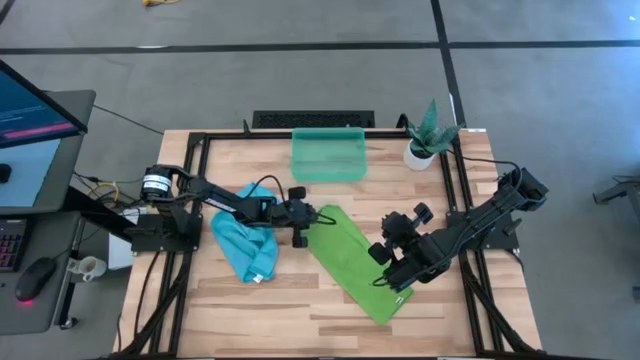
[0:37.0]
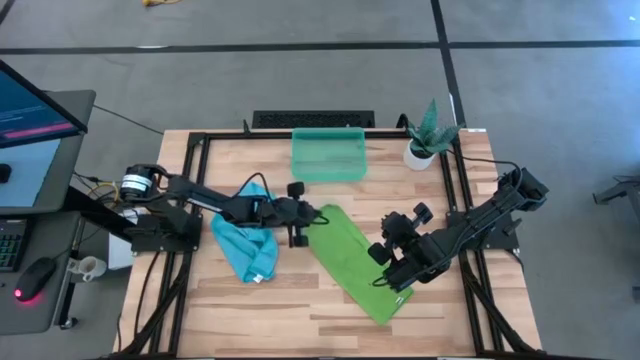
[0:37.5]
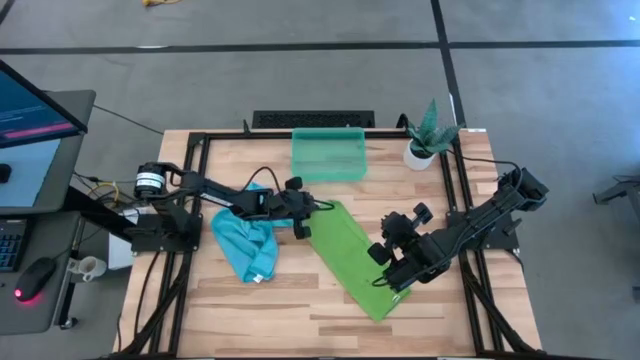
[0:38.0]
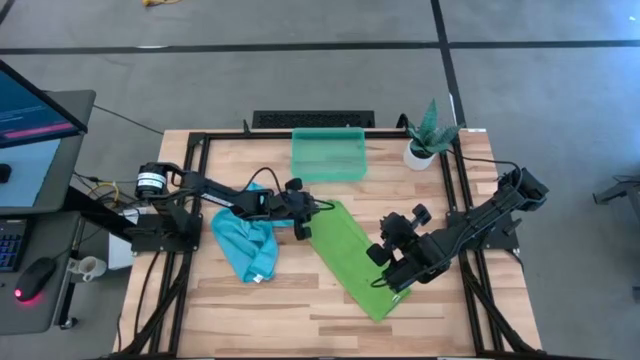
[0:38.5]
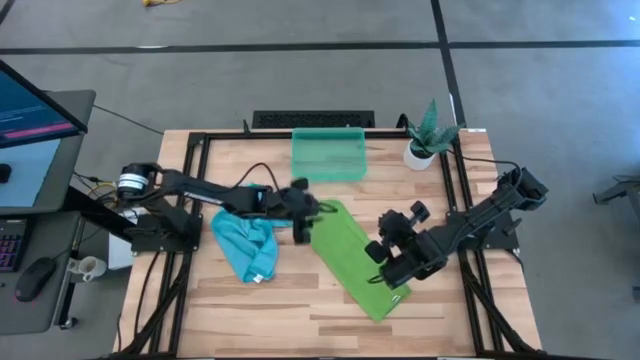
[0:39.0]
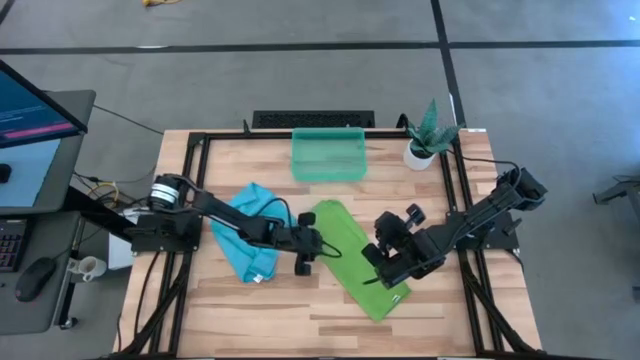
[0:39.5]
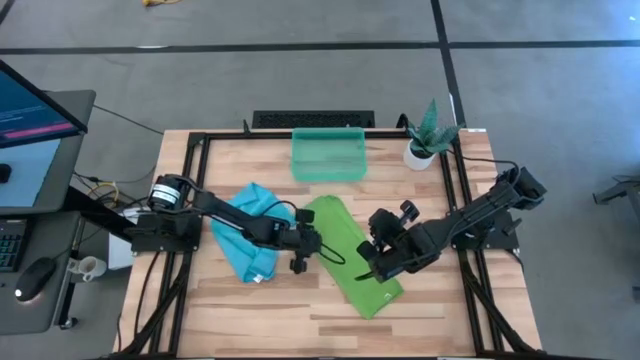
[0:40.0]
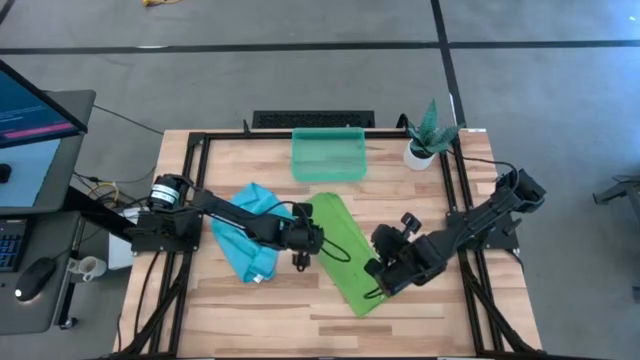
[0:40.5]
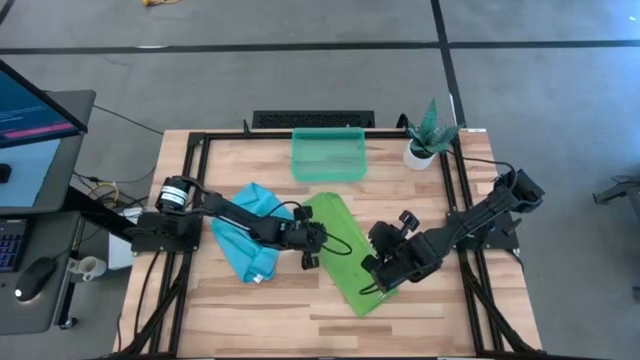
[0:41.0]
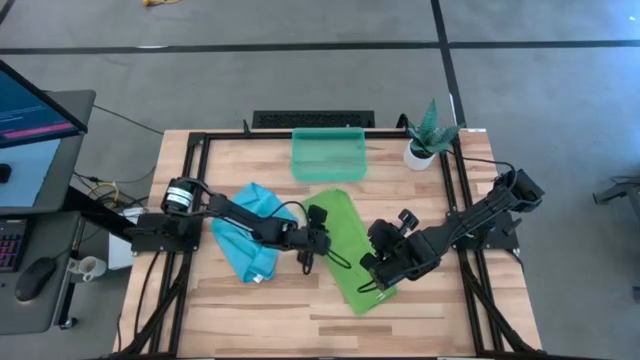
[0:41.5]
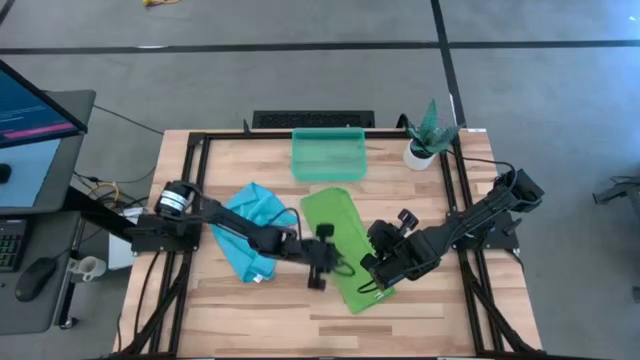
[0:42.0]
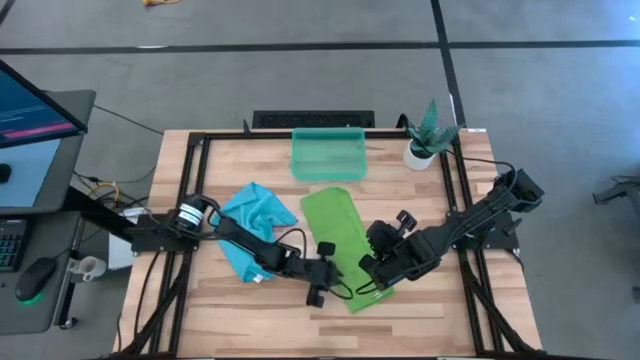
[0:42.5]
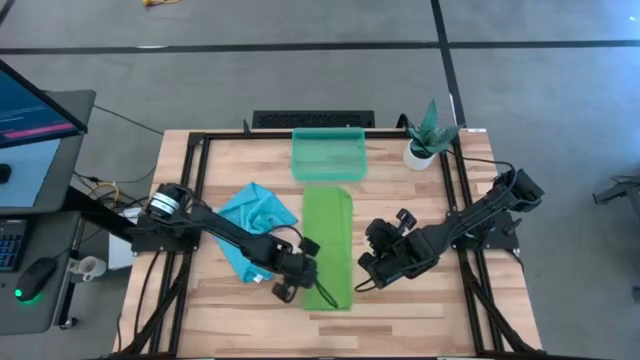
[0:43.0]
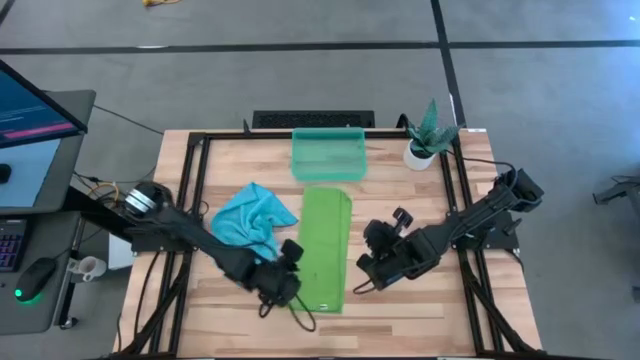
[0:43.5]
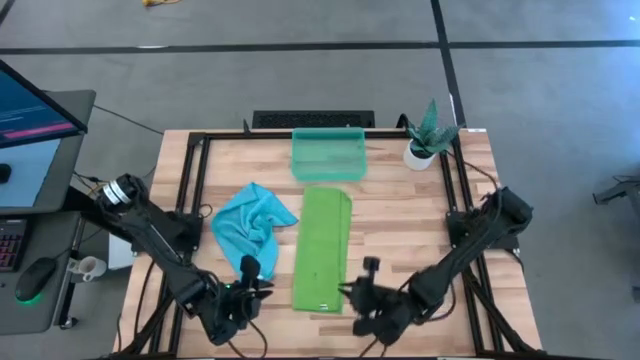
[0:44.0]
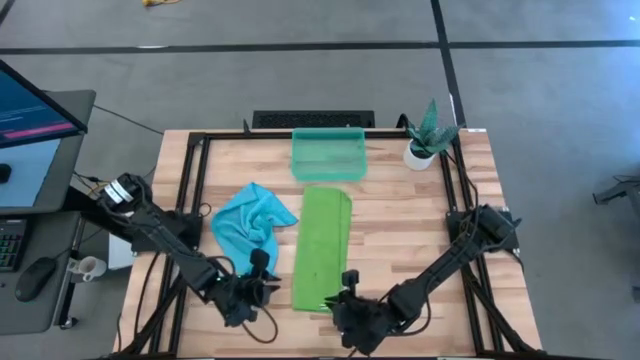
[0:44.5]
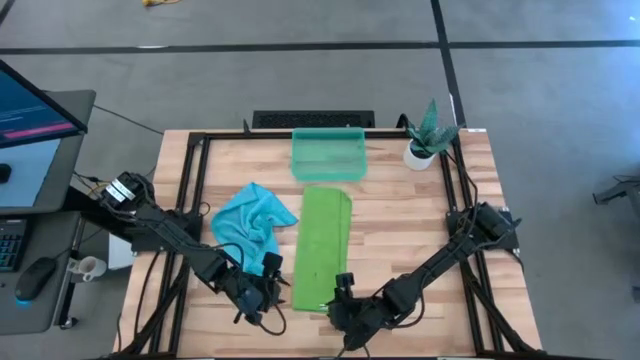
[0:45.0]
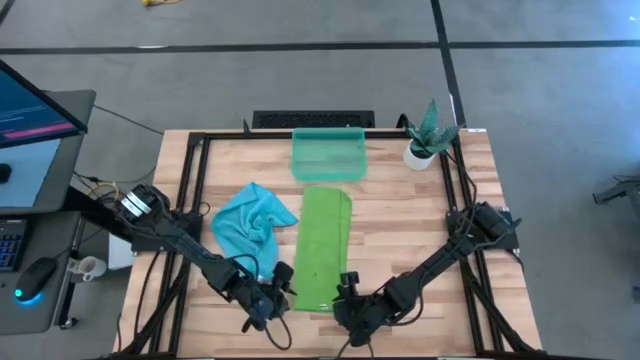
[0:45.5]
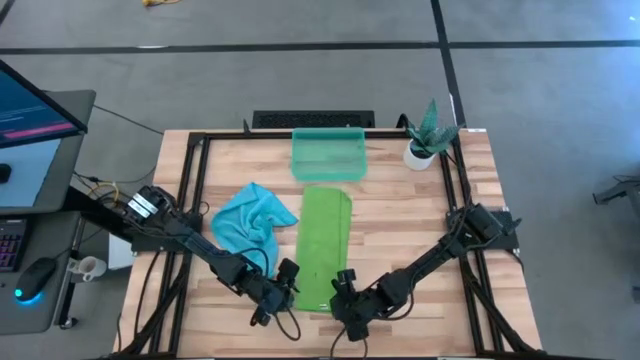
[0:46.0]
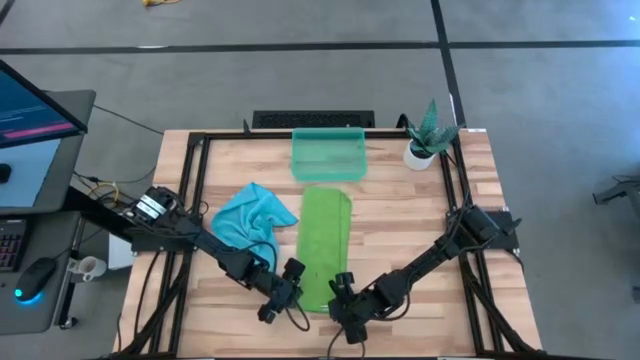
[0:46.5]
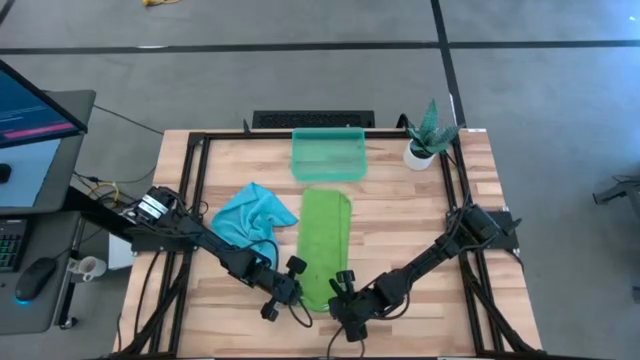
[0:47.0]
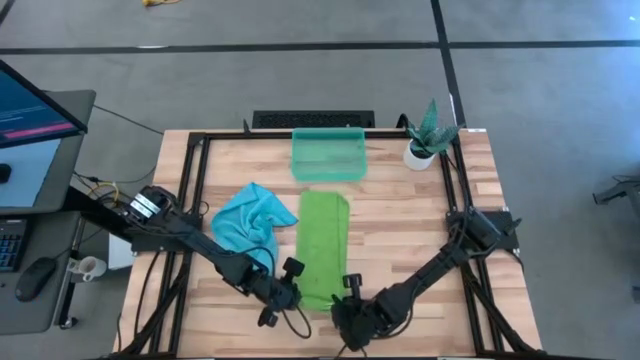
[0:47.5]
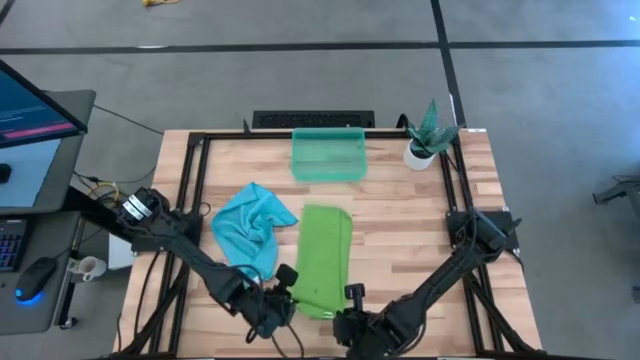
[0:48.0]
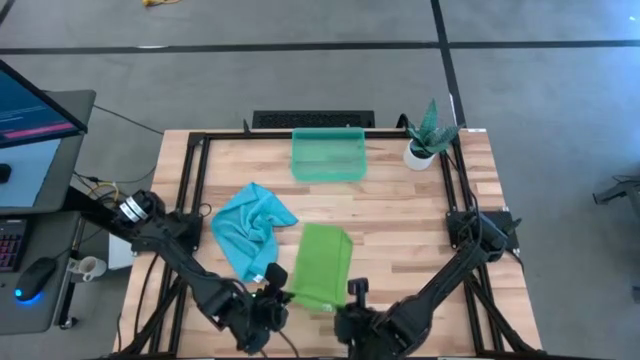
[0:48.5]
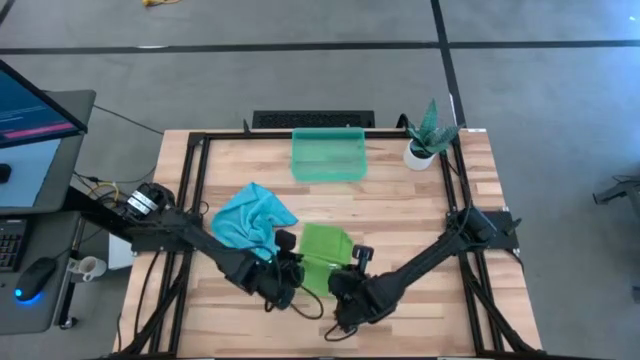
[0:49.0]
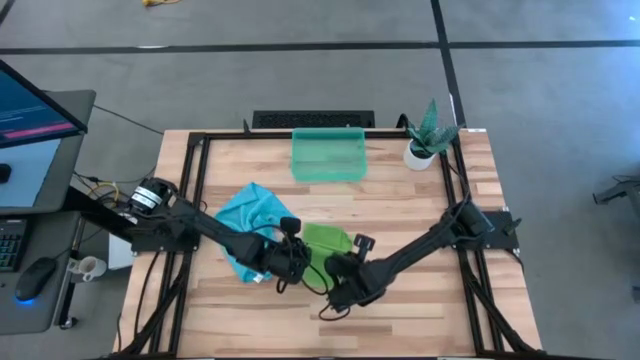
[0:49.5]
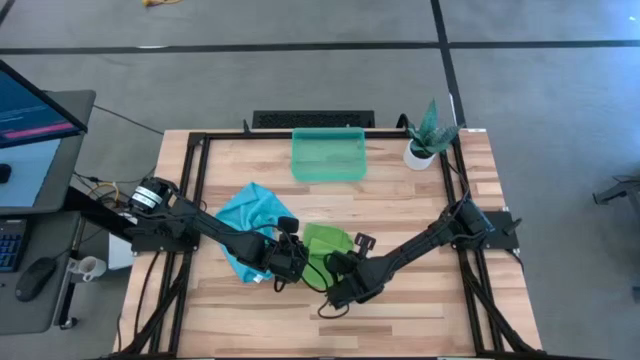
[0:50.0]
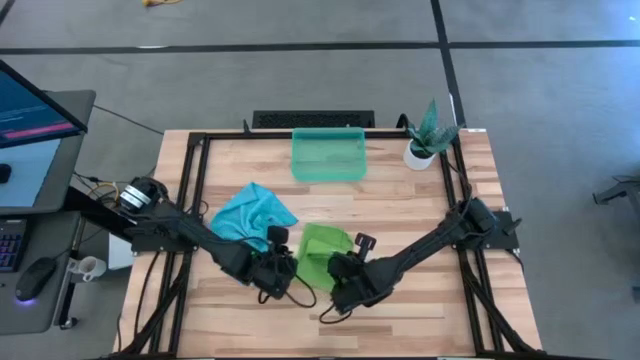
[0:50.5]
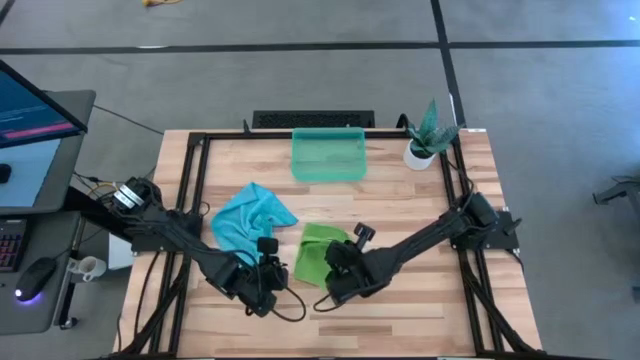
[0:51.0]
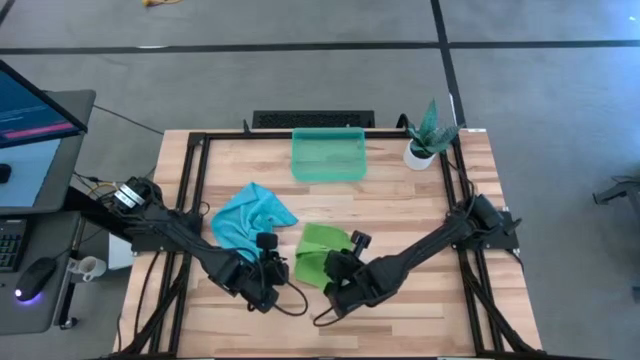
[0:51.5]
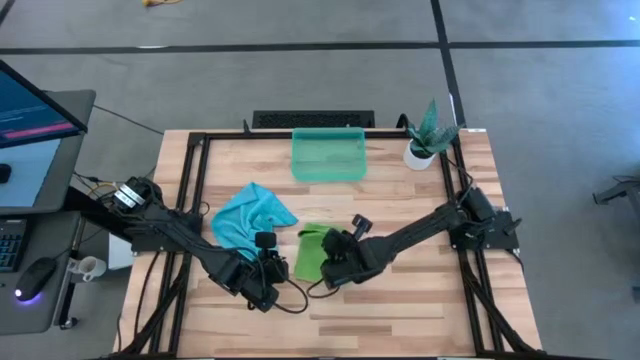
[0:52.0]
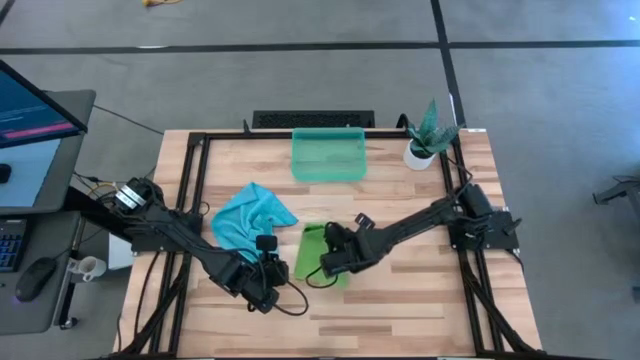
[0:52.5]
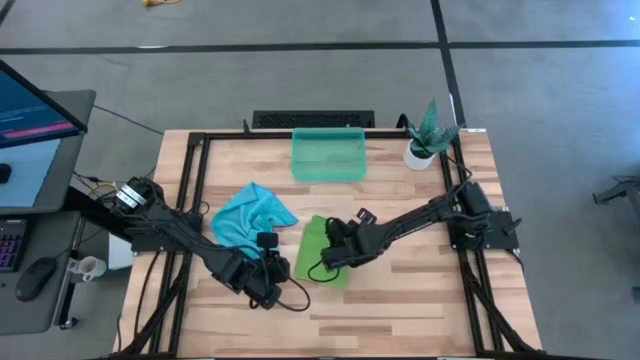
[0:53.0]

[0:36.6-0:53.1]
Task: Roll microfiber towels into tight, uniform cylinder then place into a basket
Fold the green microfiber cloth

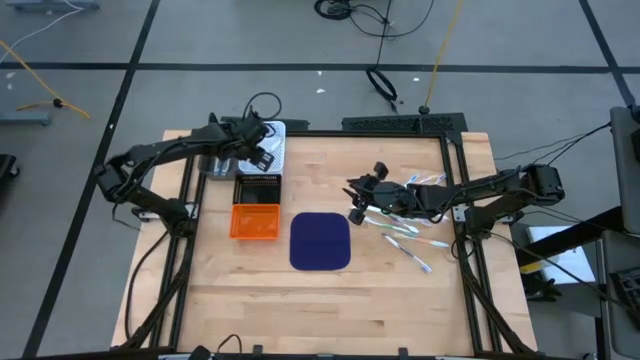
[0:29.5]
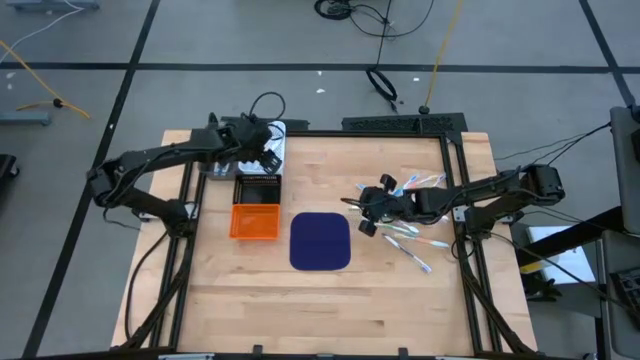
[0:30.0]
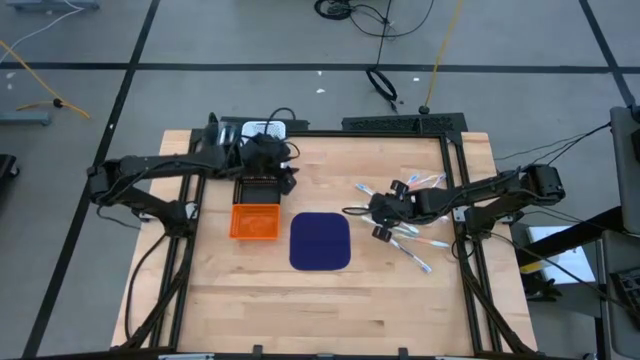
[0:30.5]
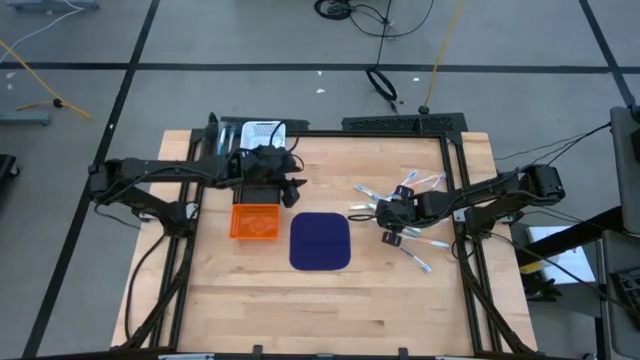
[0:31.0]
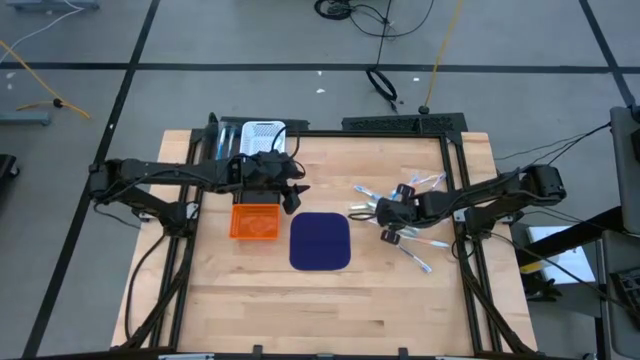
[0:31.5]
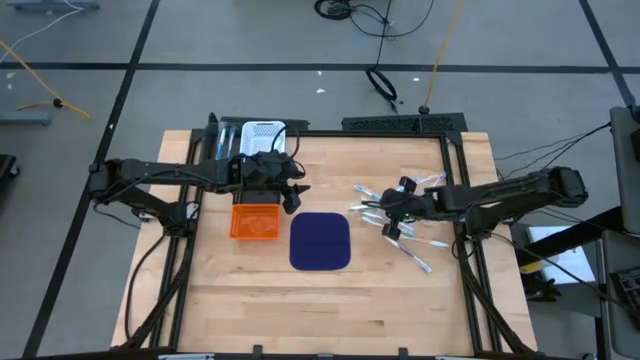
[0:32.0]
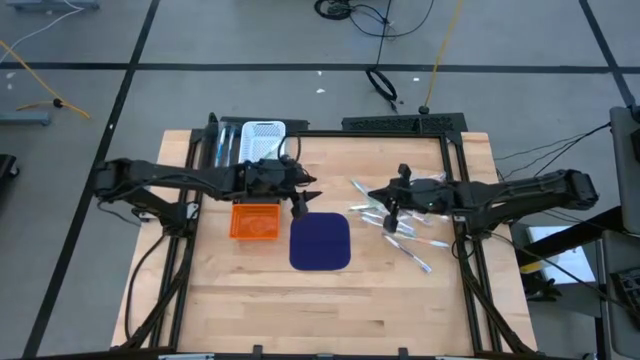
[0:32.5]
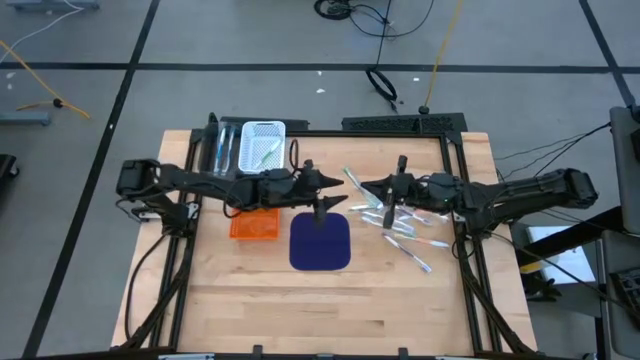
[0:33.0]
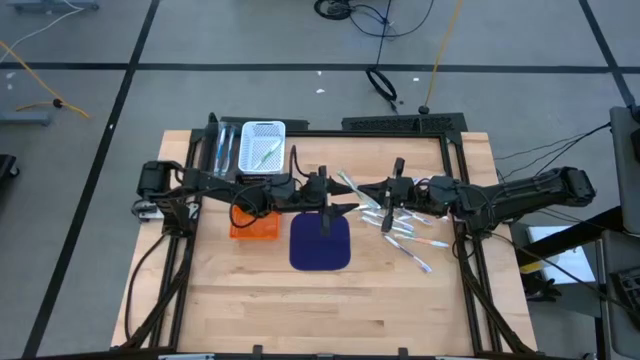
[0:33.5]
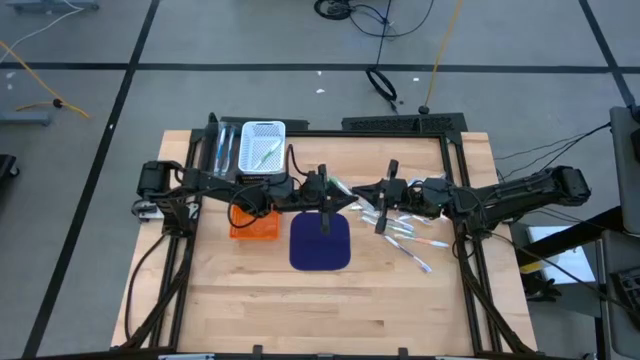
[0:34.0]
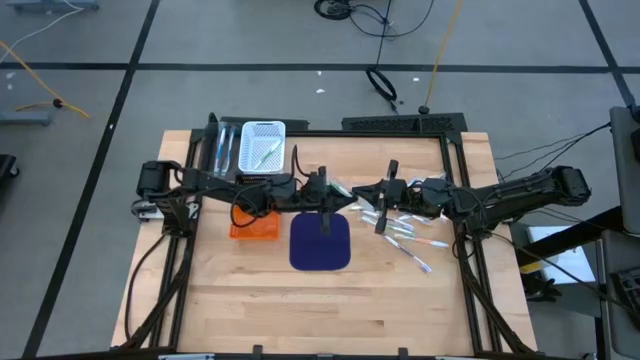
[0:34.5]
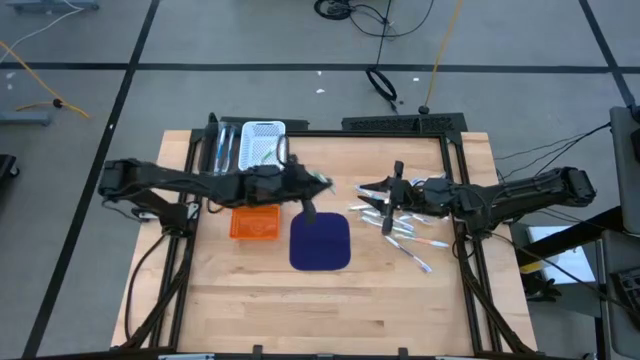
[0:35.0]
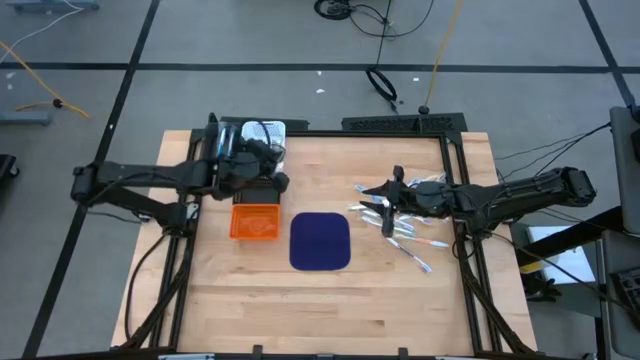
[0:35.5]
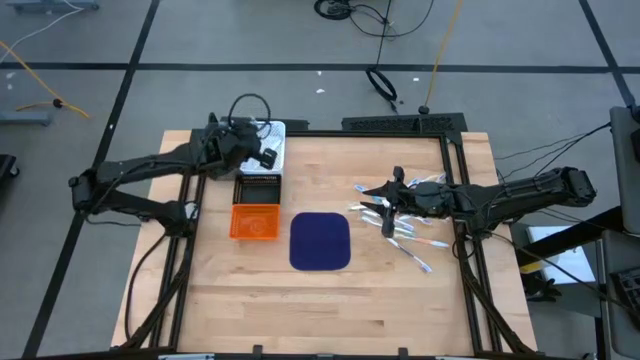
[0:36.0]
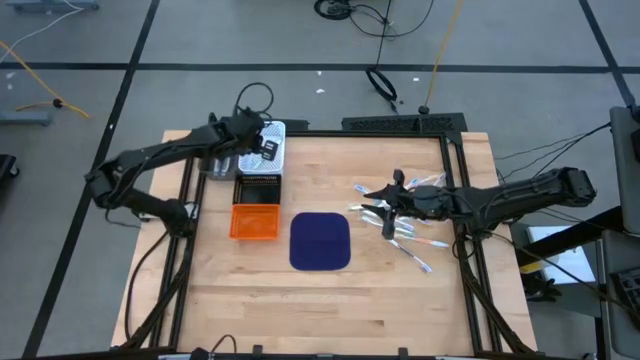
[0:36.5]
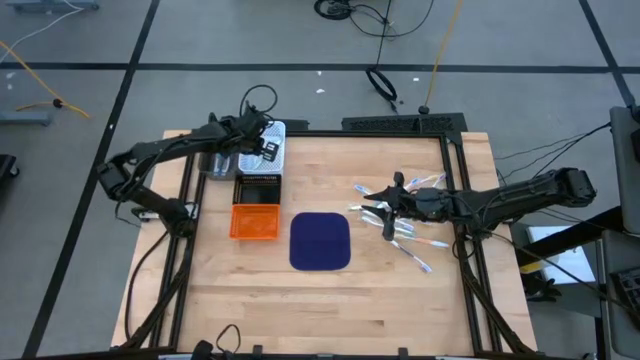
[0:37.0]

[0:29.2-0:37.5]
Task: Pick & Place Toothbrushes
Put the green toothbrush into the white bin
